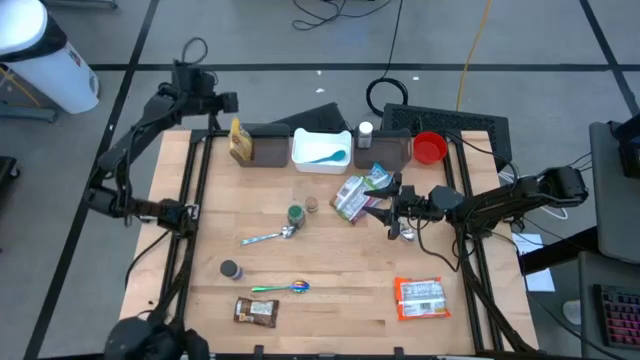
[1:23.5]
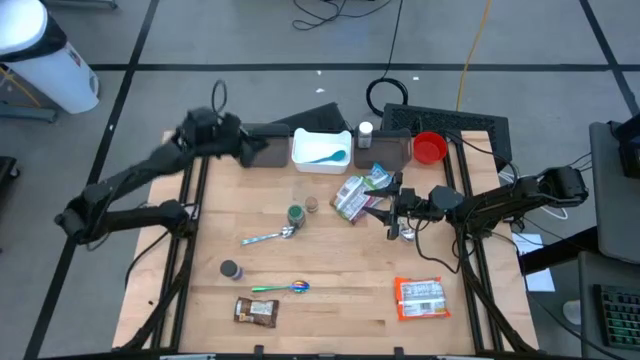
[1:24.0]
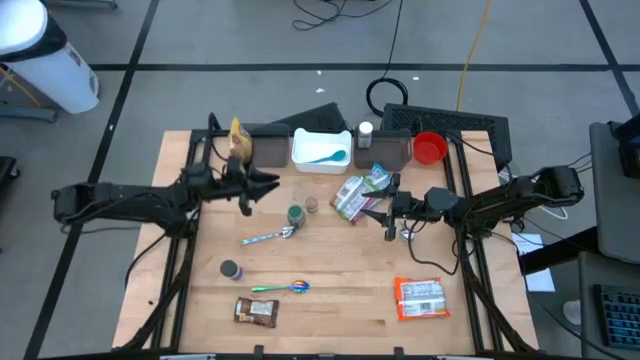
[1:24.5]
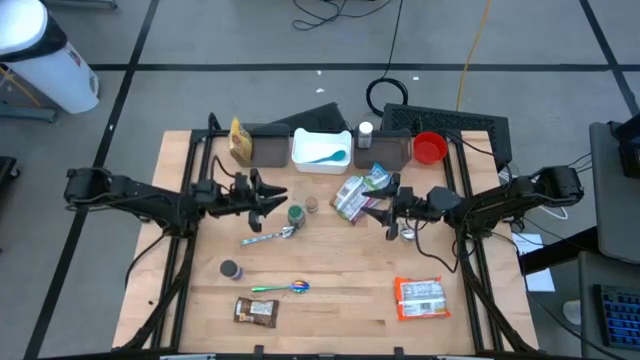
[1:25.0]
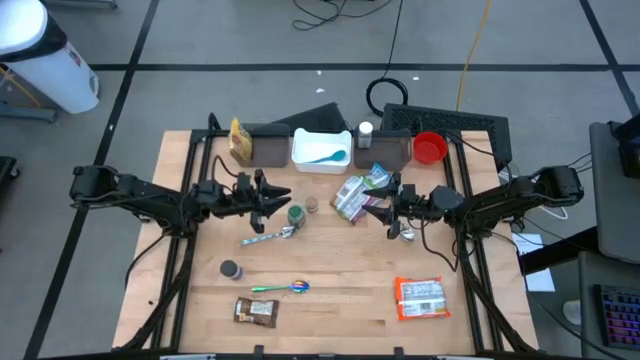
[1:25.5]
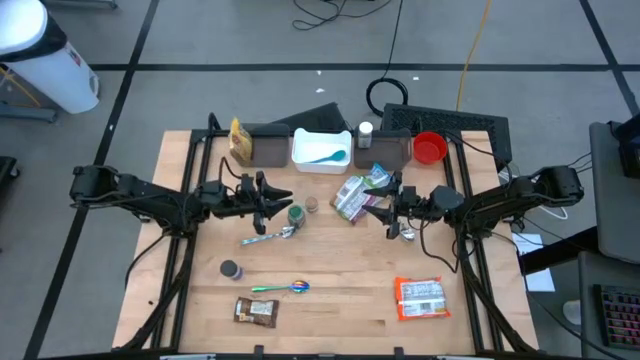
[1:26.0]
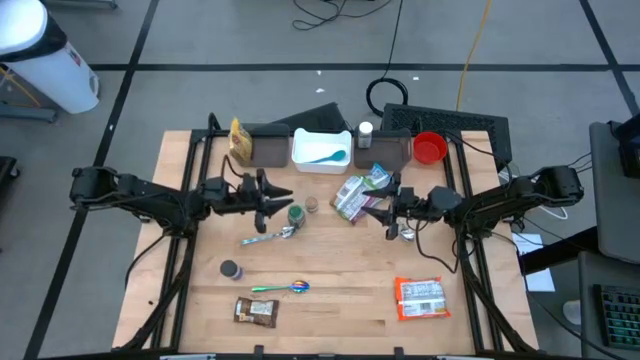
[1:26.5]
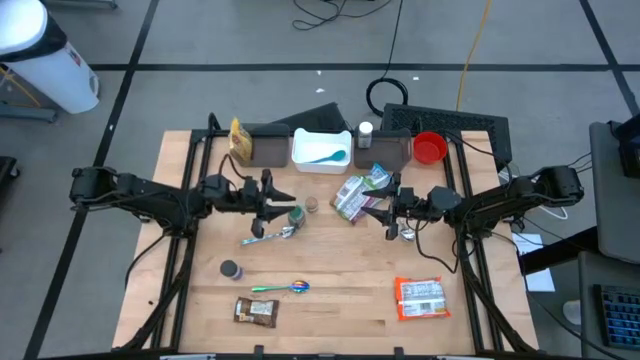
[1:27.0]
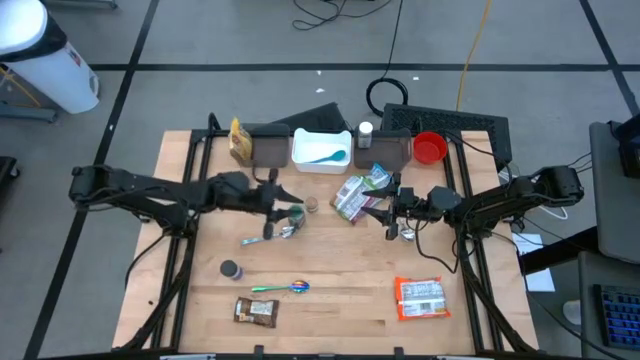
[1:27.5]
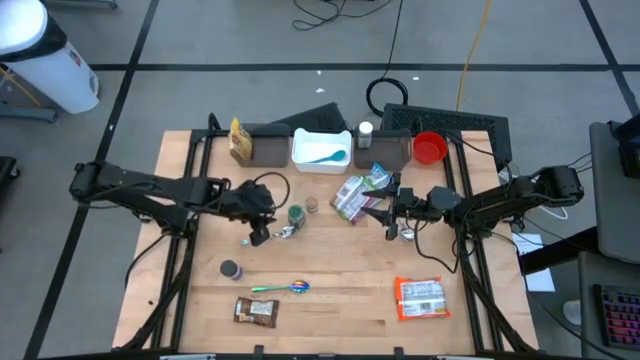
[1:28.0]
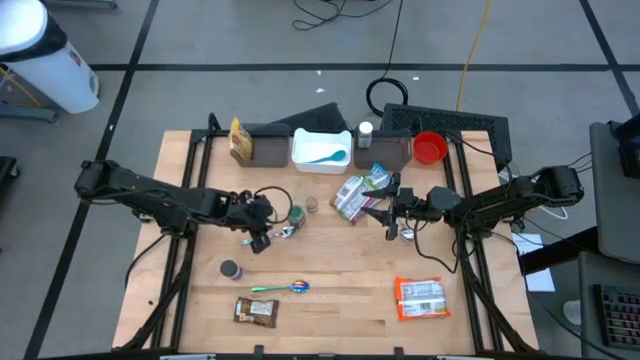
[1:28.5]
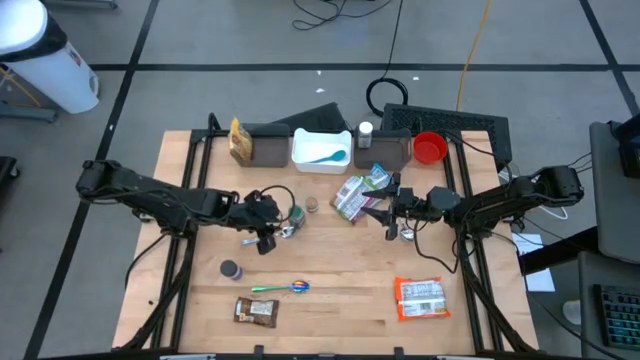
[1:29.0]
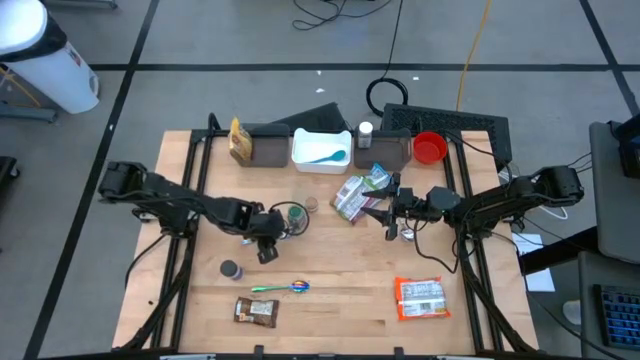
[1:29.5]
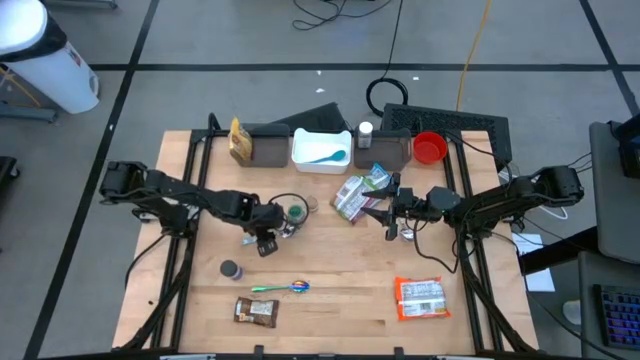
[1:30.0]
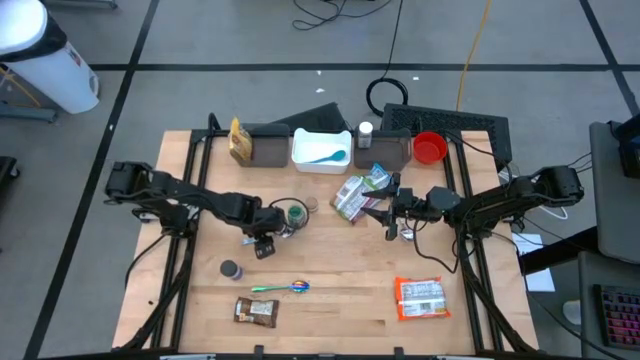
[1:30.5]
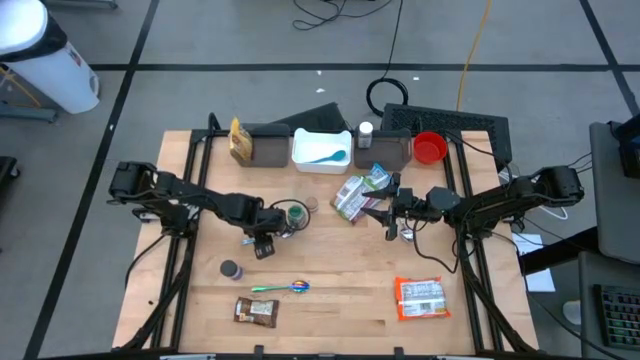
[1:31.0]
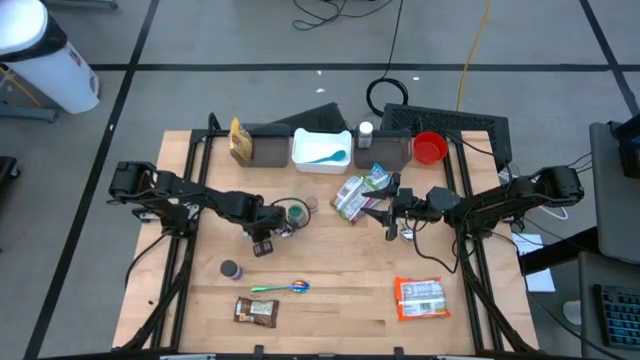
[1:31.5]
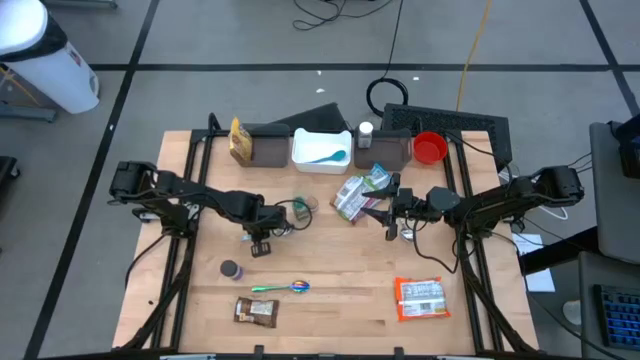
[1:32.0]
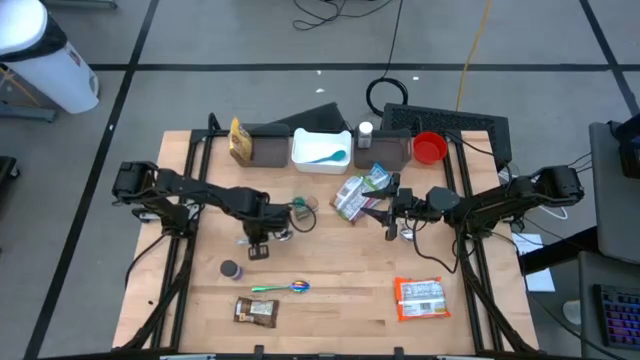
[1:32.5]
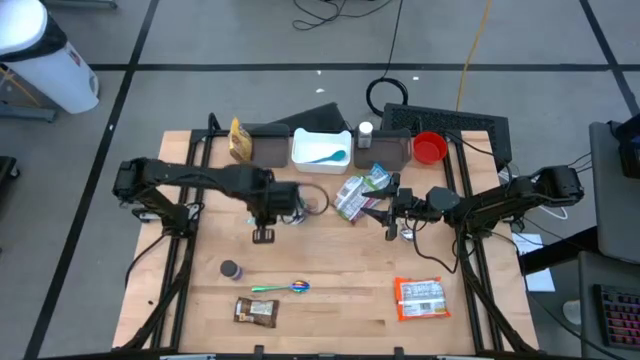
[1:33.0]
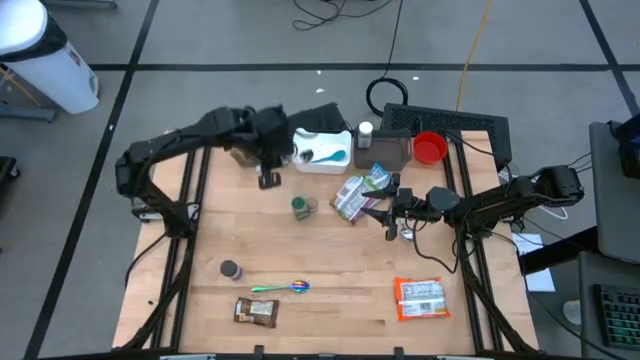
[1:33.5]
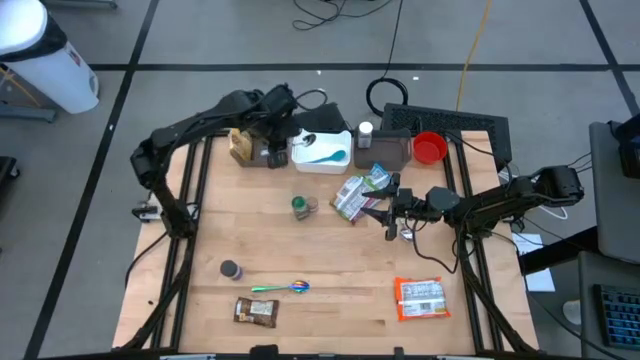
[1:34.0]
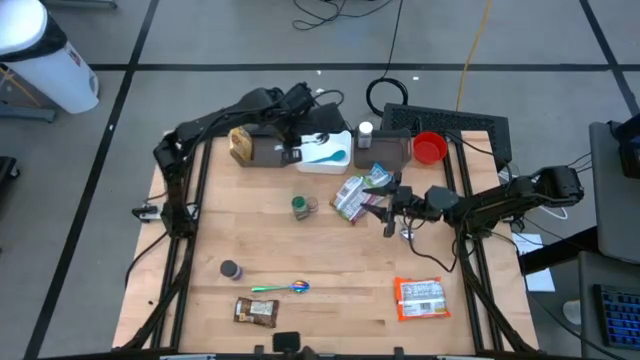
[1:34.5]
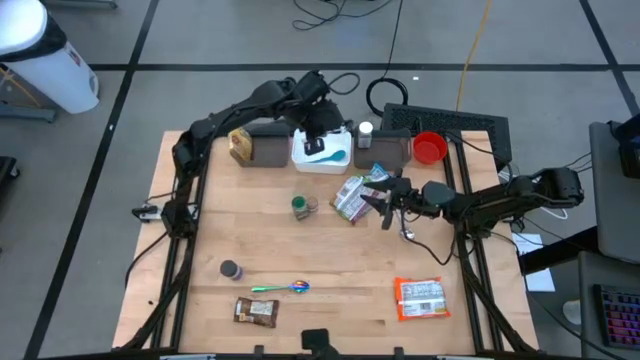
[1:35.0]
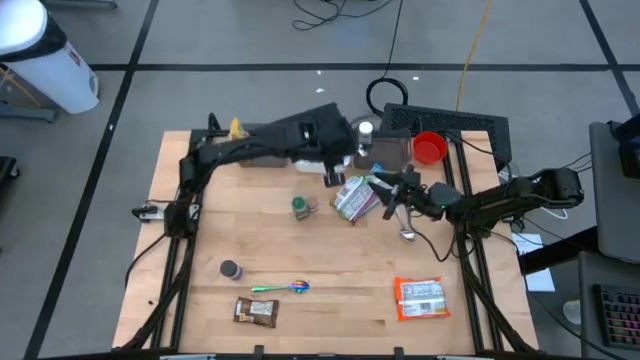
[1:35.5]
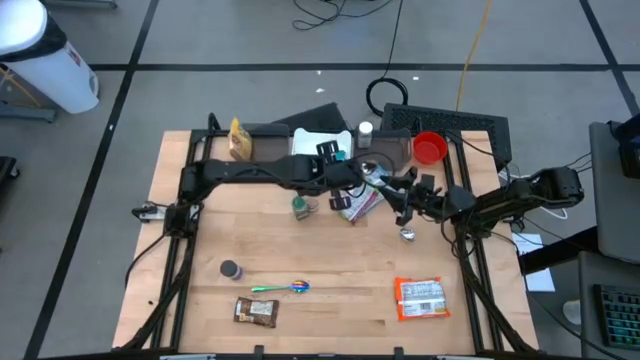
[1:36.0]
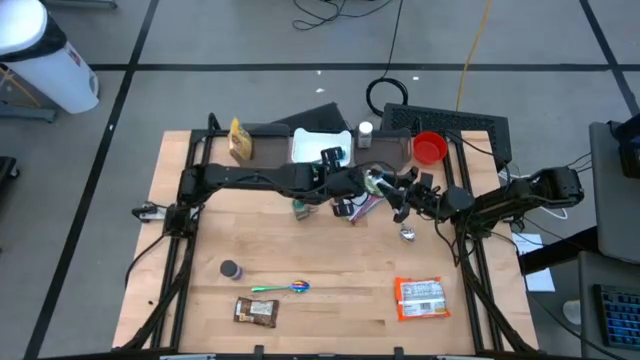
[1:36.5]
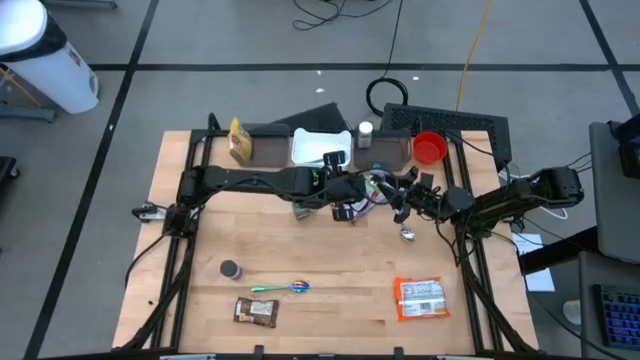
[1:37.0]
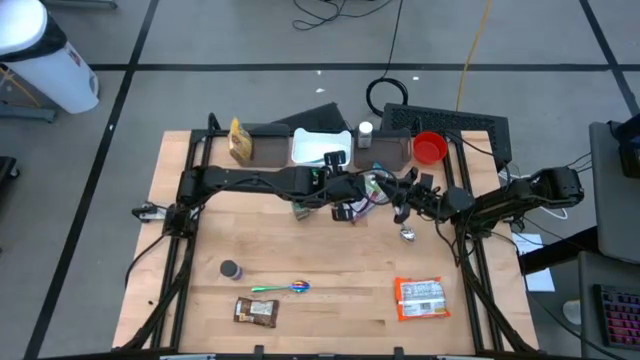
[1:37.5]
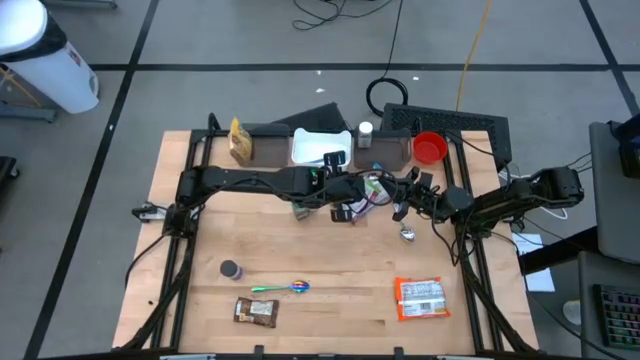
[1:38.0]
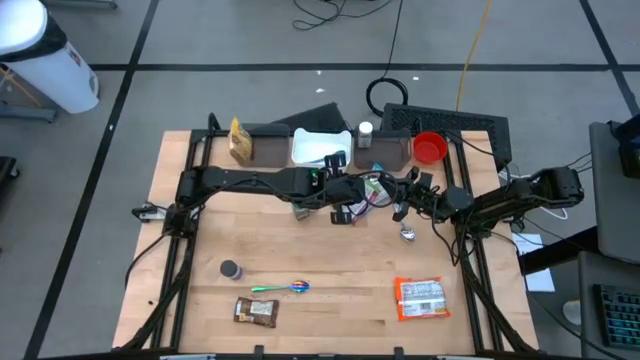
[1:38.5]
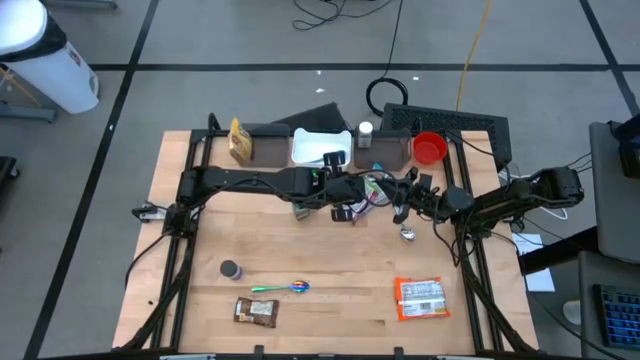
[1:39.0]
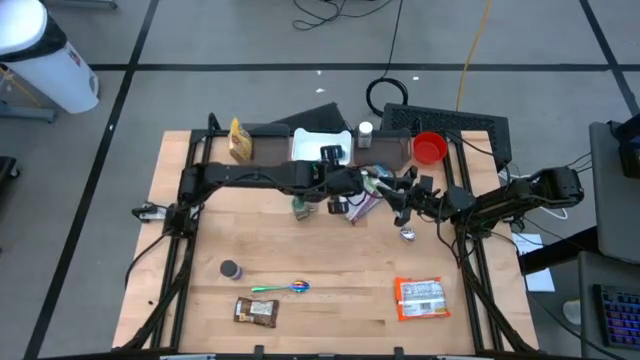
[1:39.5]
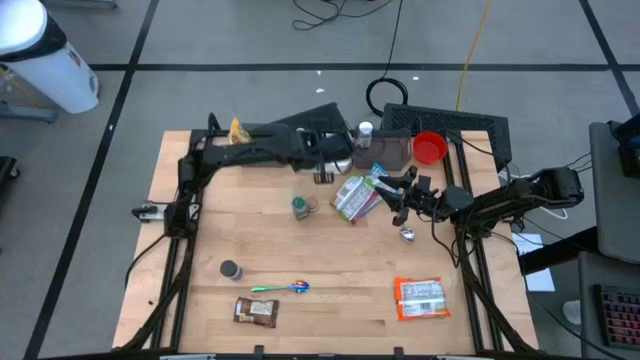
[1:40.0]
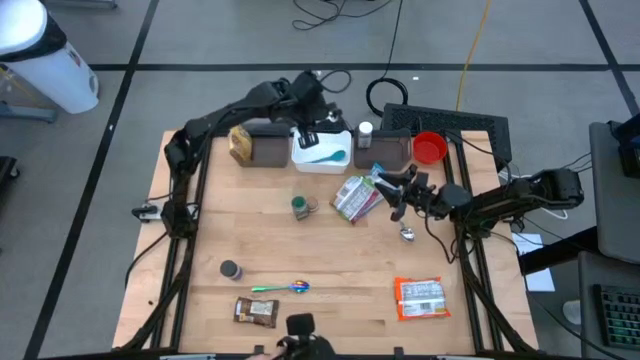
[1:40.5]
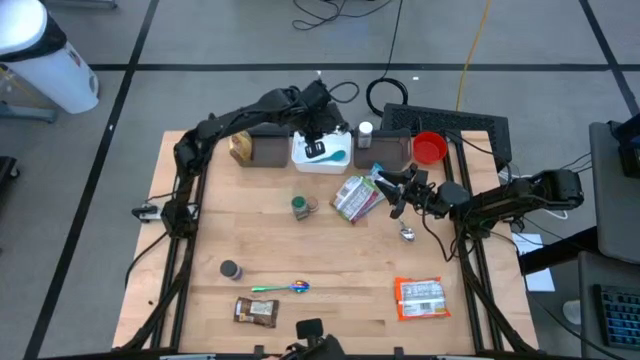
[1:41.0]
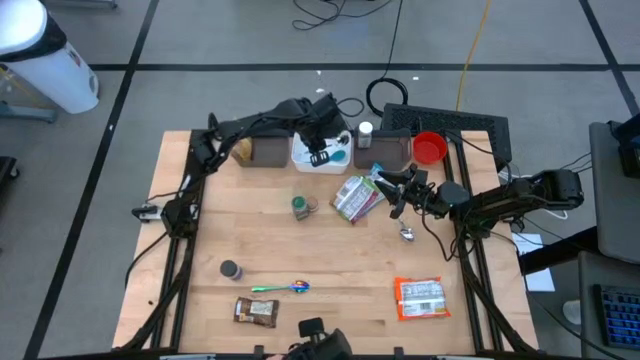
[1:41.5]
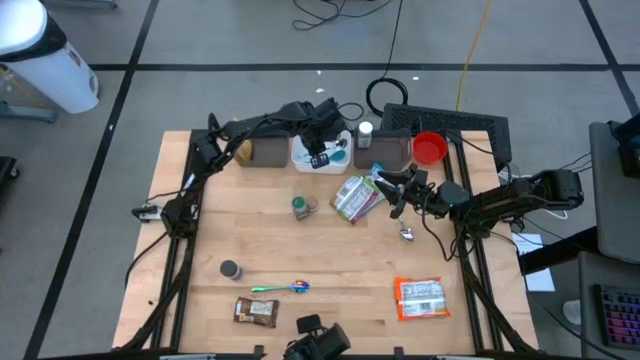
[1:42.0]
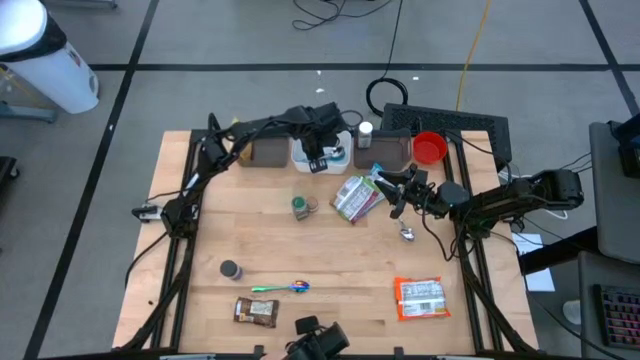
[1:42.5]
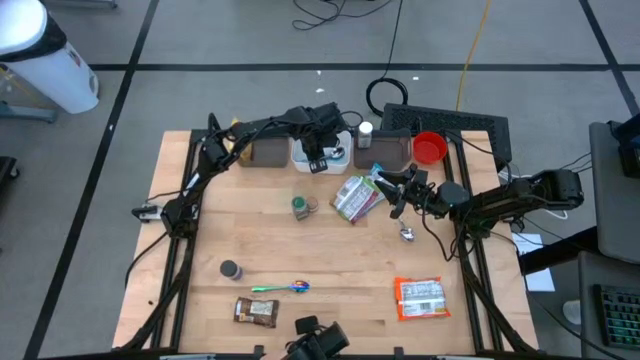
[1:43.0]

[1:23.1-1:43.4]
Task: Pick & Place Food Item
Put the bottom white and blue spoon into the white bin

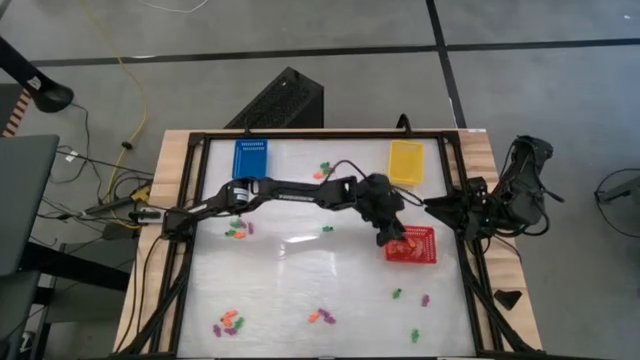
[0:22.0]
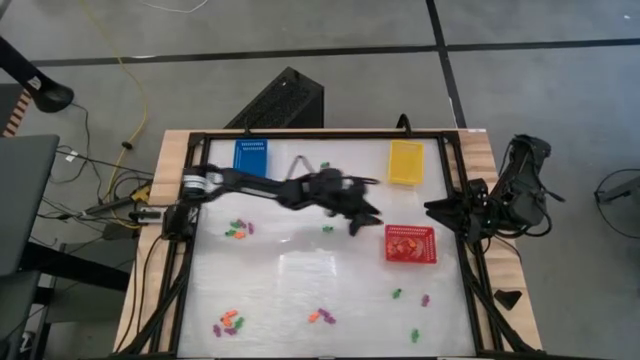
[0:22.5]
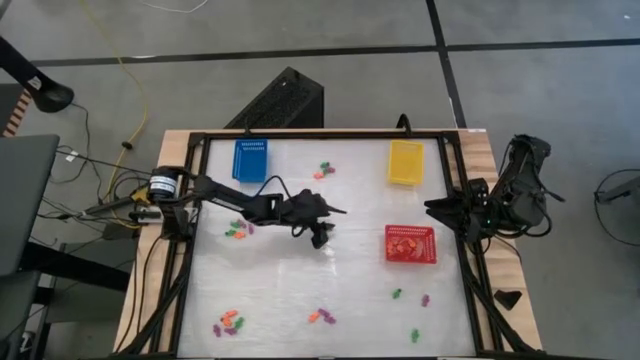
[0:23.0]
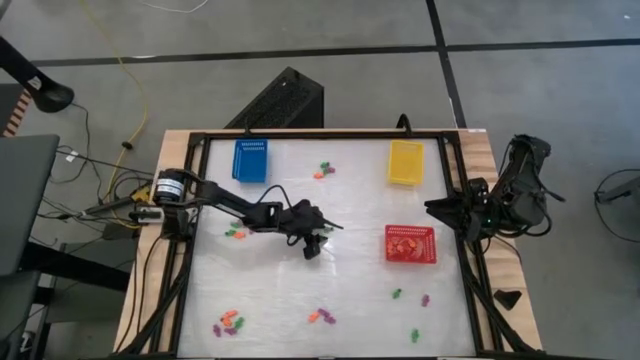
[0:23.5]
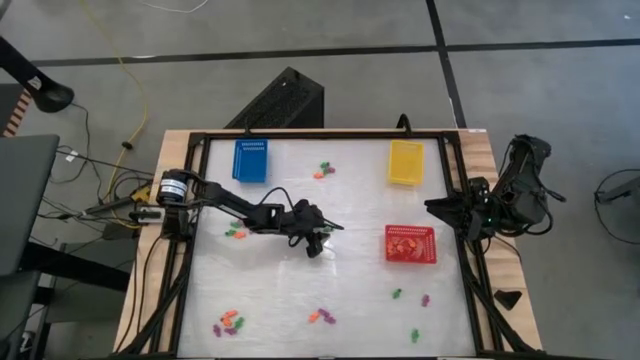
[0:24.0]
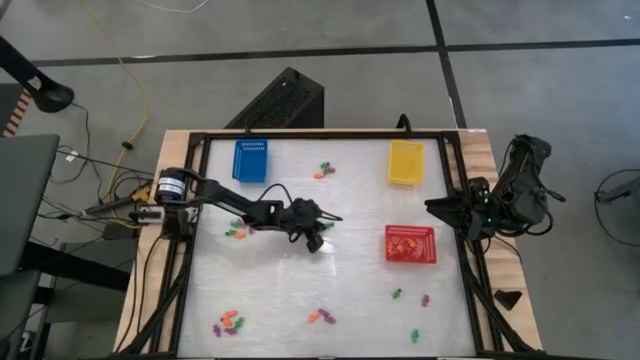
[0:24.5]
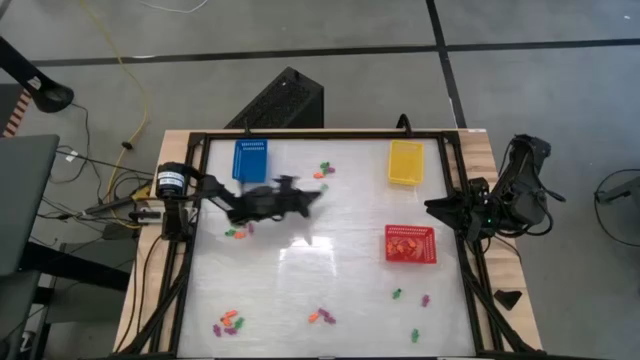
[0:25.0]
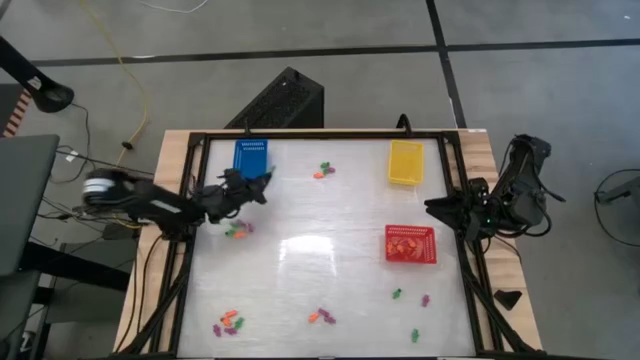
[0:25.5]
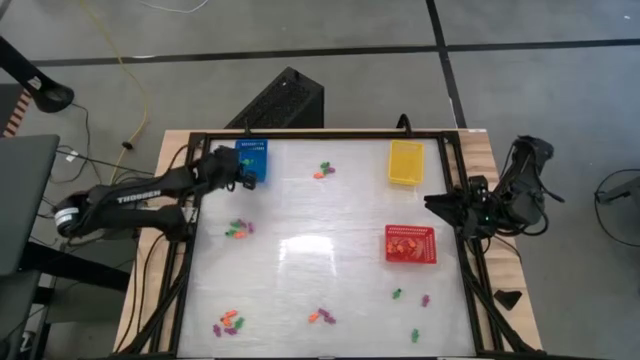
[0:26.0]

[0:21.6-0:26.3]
Task: Sort Halloween decoration
Put the green skeleton toy into the blue bin
